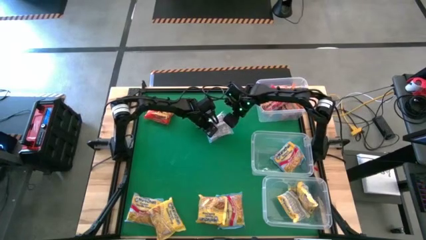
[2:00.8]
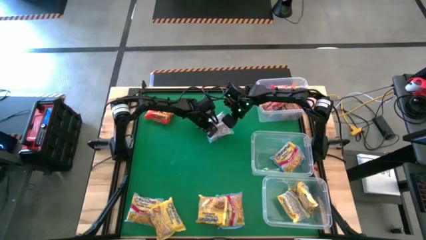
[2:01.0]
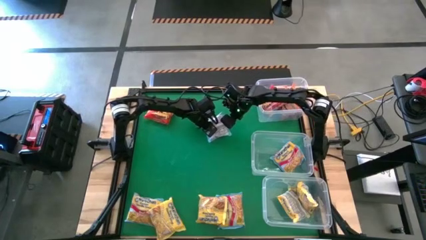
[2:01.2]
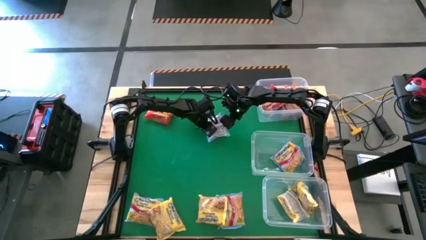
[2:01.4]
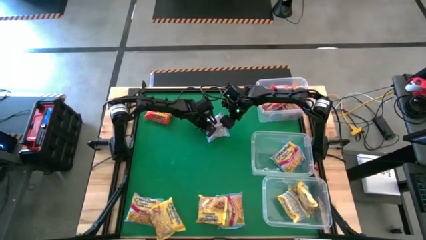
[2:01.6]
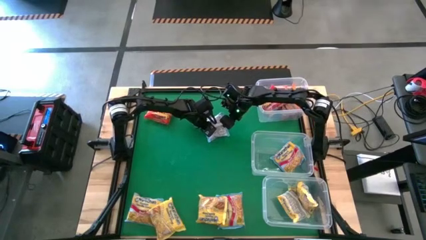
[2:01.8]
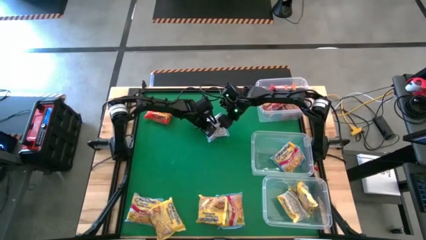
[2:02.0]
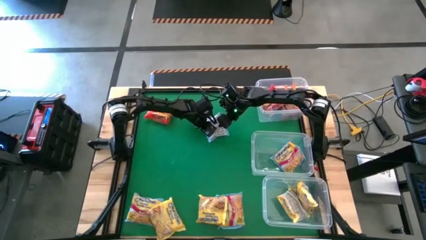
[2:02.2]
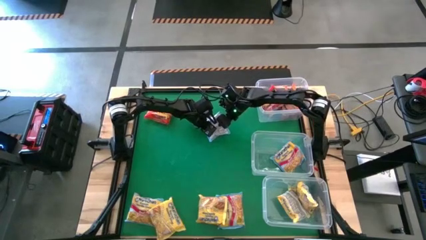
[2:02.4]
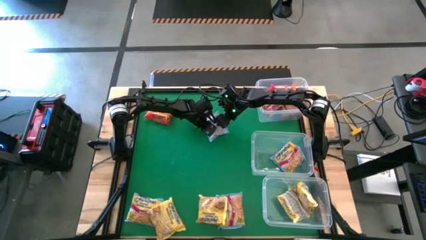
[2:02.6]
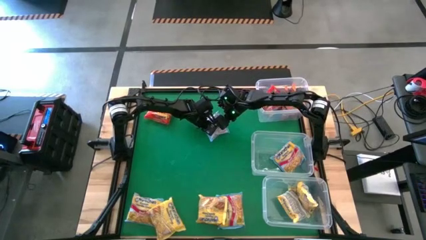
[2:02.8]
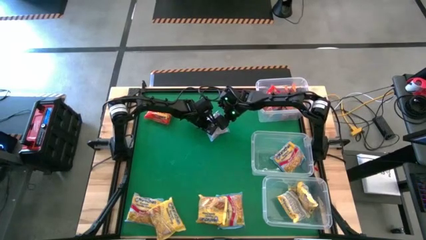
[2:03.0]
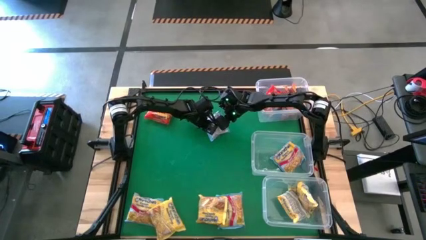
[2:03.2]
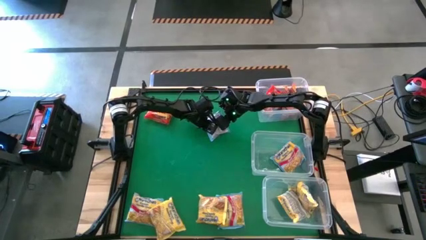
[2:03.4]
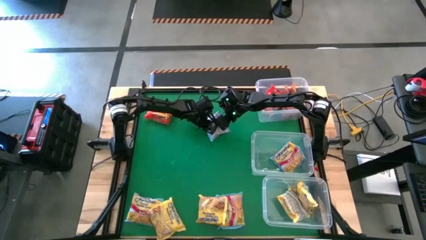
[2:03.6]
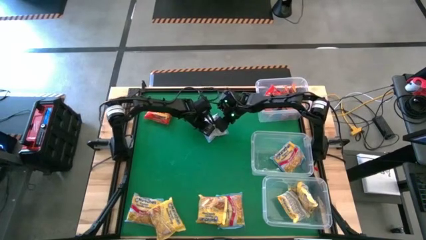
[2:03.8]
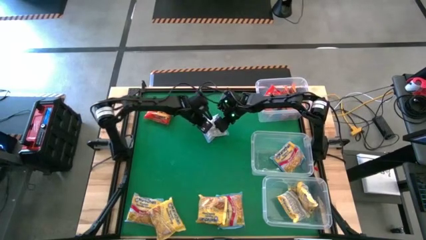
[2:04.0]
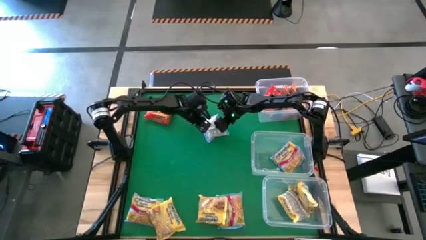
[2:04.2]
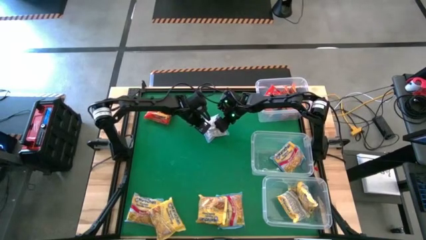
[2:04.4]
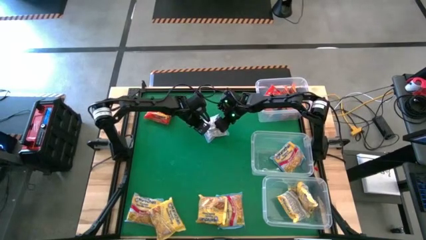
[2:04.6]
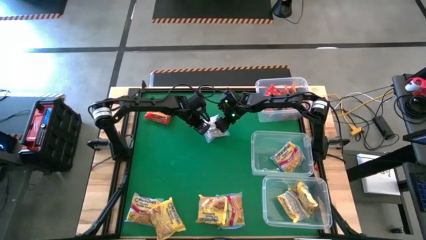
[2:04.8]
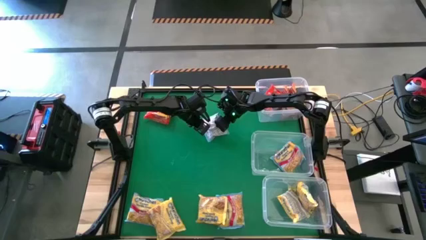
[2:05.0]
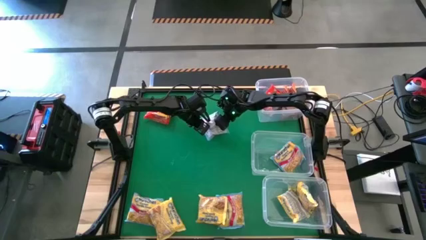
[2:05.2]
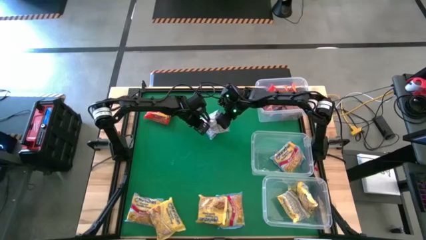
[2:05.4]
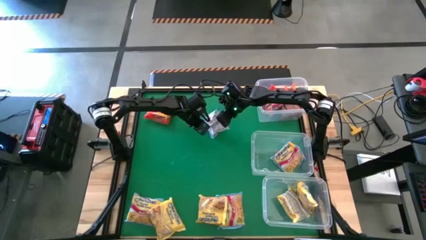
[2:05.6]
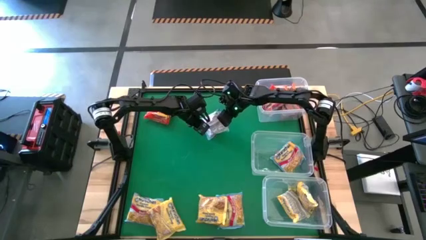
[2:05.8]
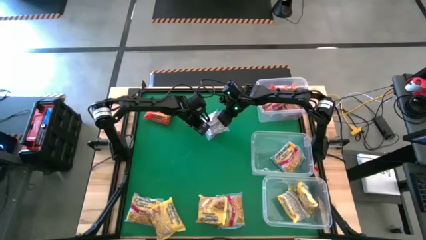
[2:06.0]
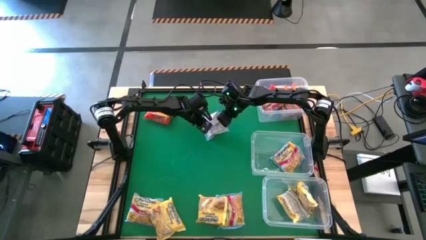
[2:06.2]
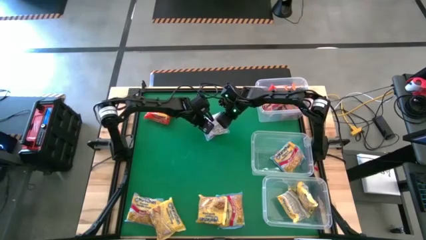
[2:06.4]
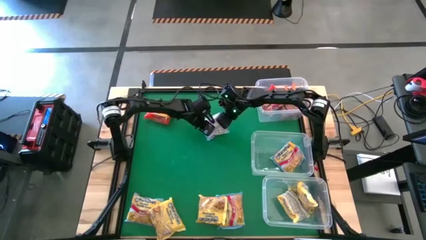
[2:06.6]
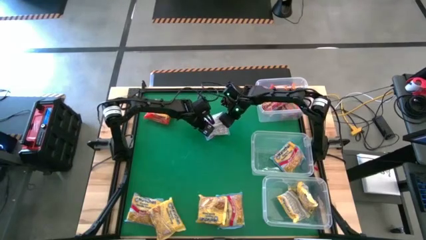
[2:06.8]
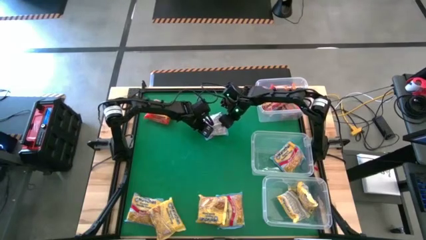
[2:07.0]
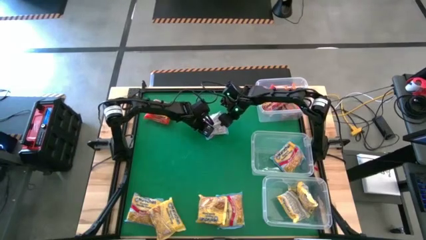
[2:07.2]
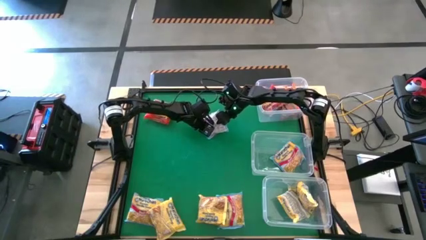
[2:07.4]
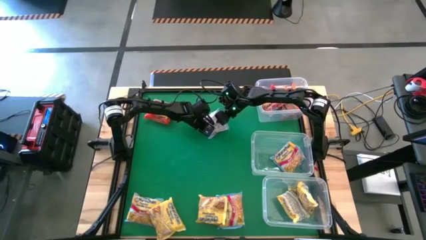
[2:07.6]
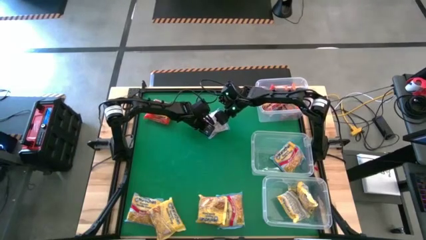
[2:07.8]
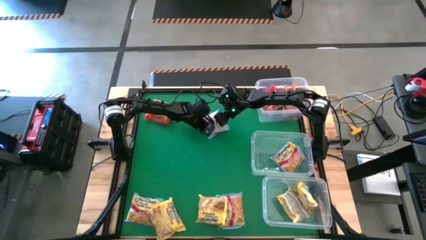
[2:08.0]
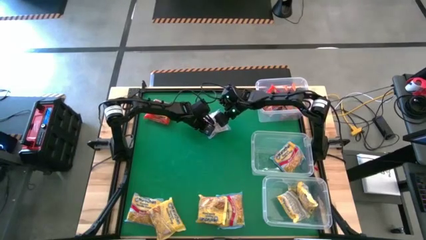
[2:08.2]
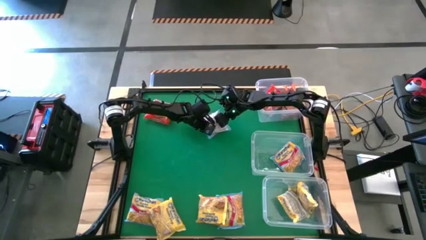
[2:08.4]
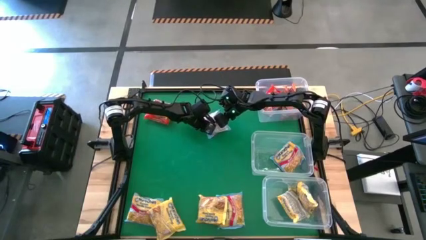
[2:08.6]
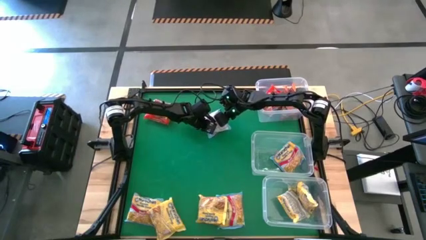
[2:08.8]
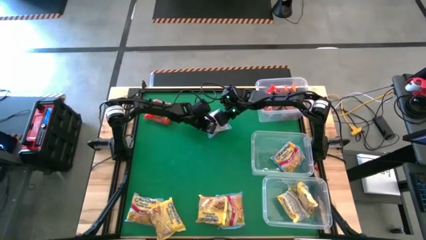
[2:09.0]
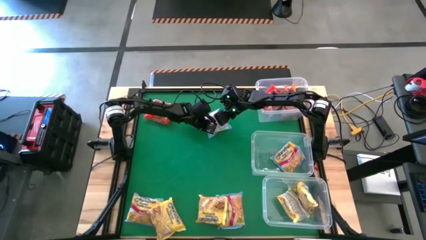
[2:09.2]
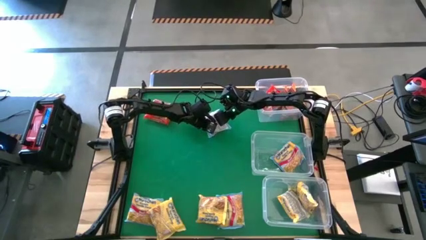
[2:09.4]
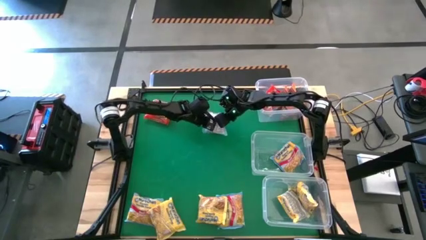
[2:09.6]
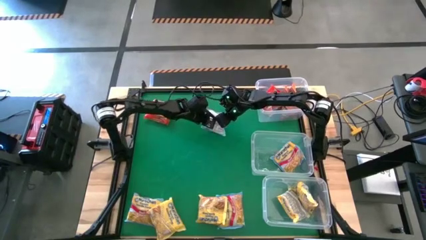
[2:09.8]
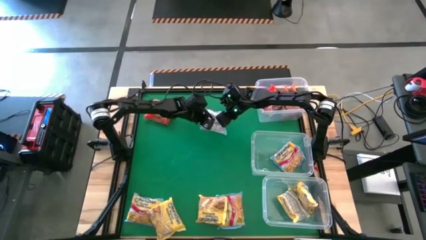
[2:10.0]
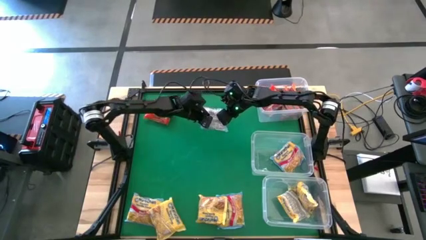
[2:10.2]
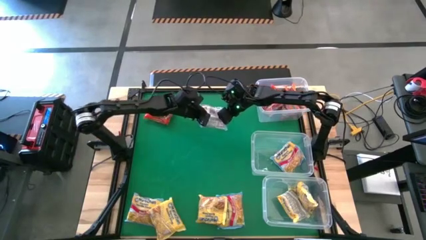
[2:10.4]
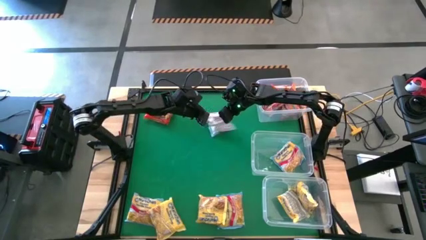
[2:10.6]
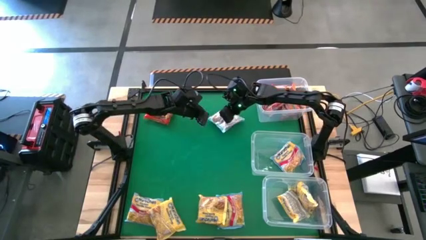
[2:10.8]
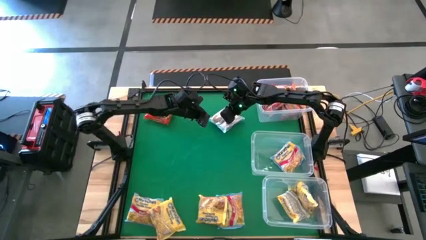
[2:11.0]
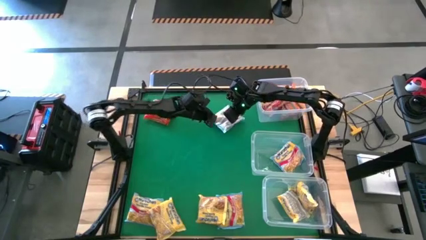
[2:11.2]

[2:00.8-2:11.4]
Task: Sort Maruchan noodles
Put the top middle noodle pack into the middle transparent bin

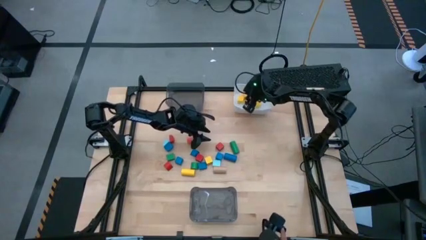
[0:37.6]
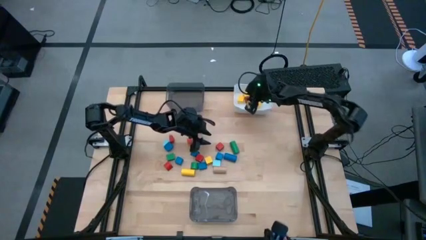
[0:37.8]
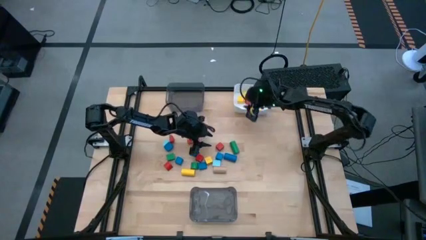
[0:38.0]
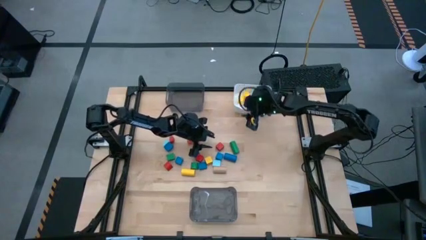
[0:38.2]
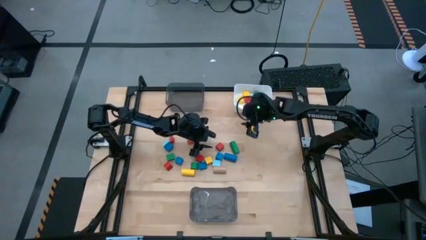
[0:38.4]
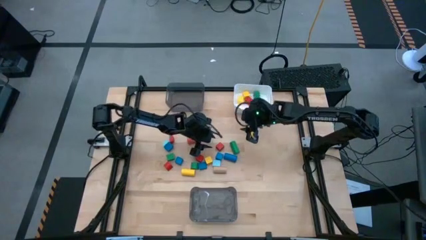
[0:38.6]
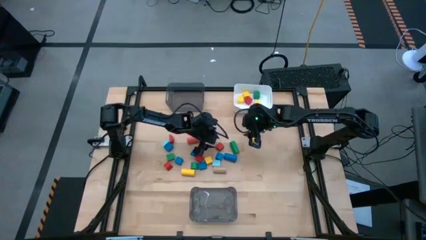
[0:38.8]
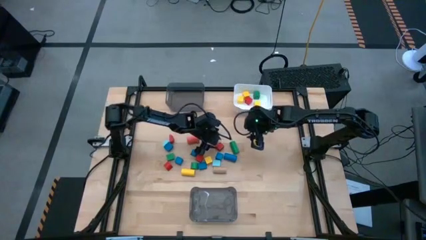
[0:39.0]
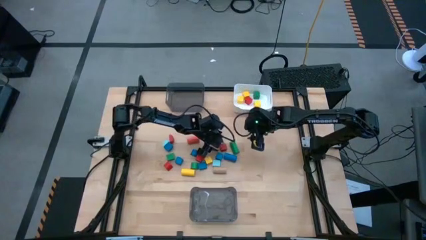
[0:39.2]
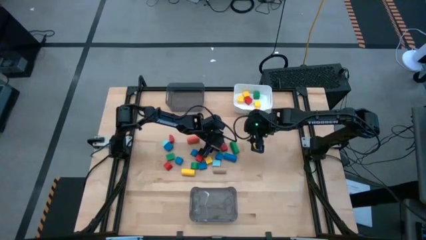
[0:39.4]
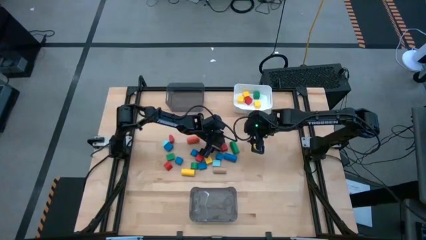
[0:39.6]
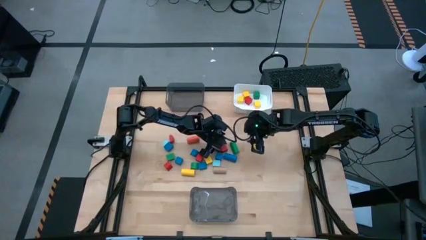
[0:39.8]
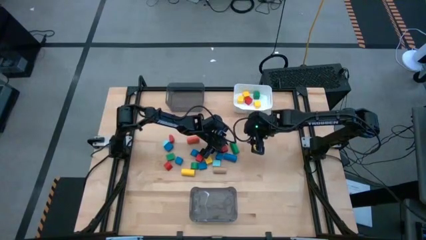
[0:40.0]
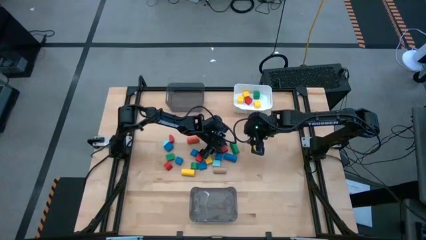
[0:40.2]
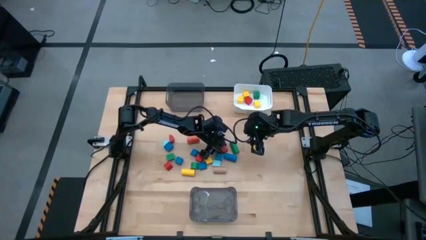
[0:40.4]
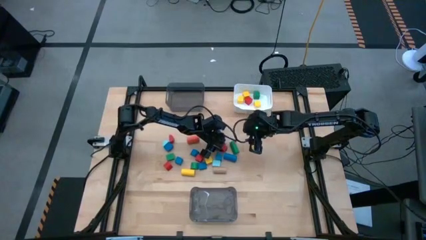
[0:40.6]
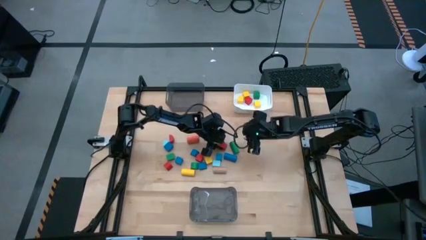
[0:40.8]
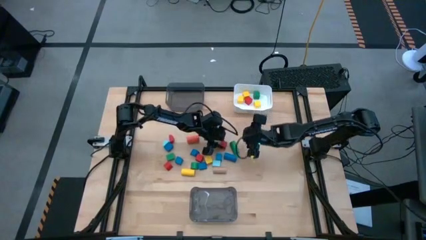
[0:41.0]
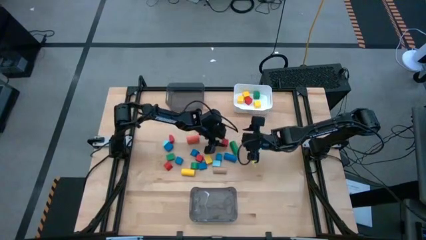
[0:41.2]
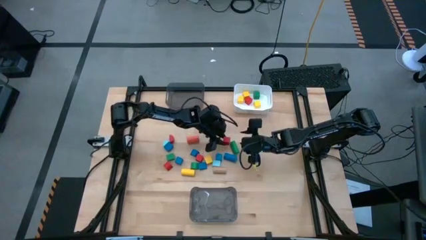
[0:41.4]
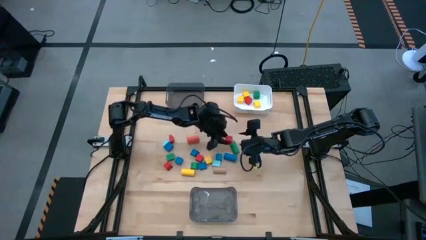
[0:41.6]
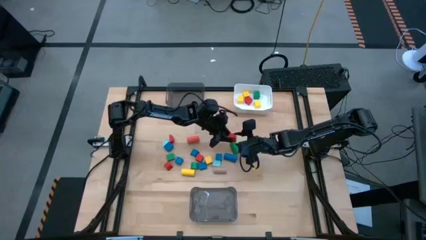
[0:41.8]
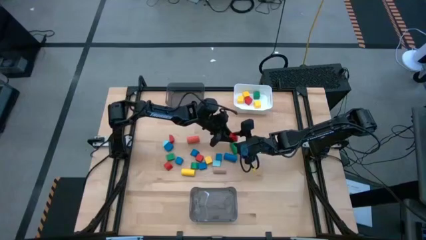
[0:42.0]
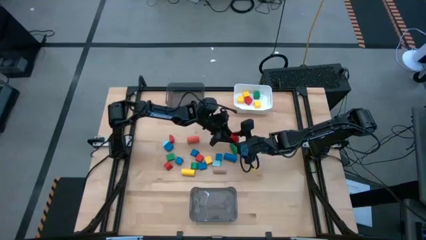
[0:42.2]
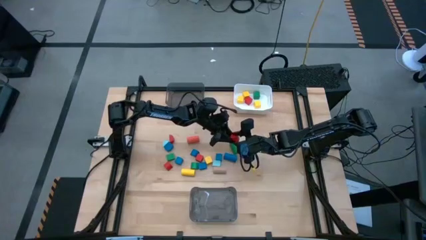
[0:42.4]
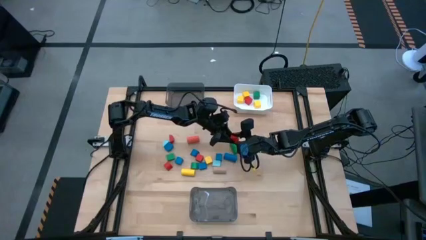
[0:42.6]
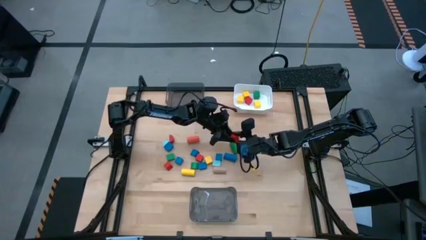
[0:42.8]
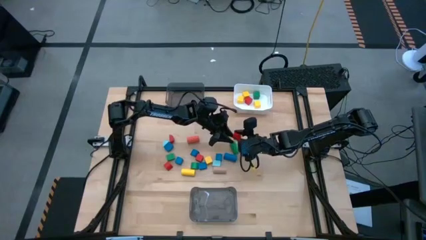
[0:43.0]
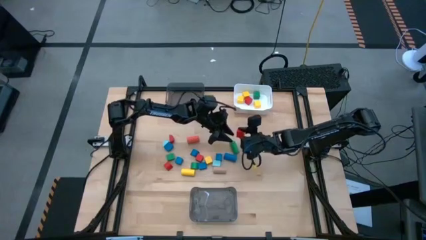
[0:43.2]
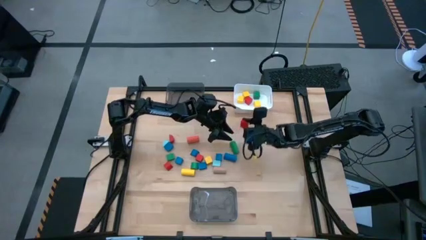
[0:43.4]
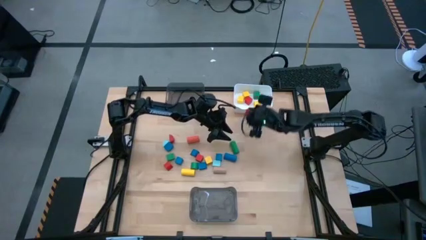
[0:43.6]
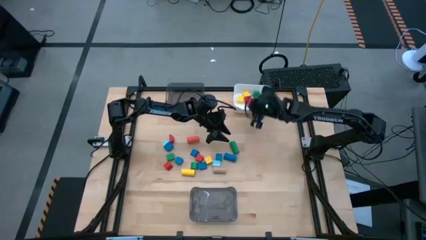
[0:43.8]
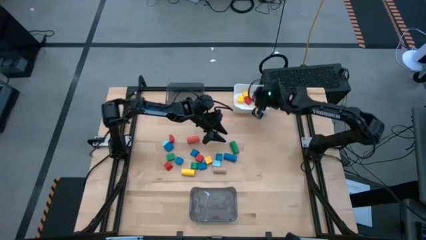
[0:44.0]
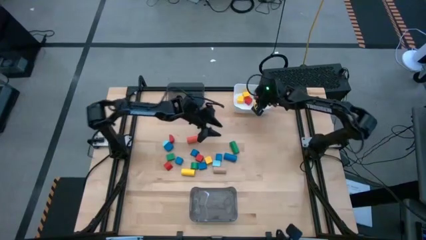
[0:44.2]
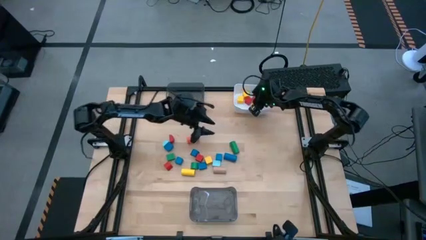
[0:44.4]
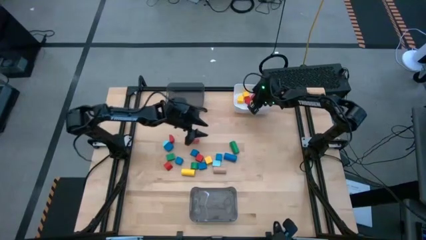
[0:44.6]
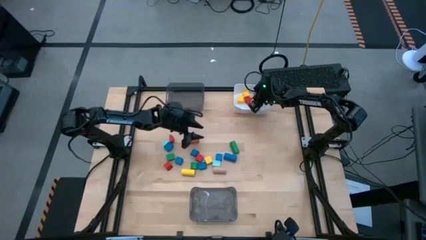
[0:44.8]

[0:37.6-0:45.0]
Task: Sort blocks by size
Put the red square block into the white bin
